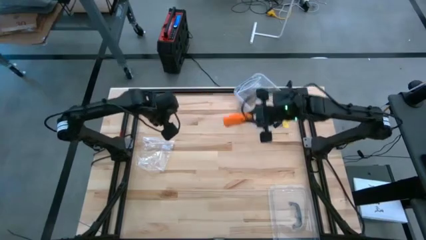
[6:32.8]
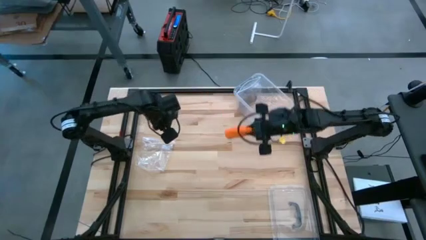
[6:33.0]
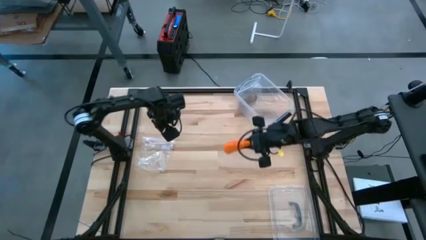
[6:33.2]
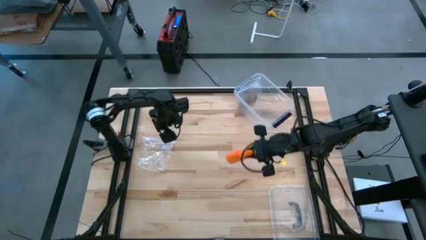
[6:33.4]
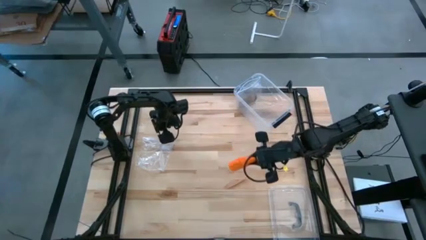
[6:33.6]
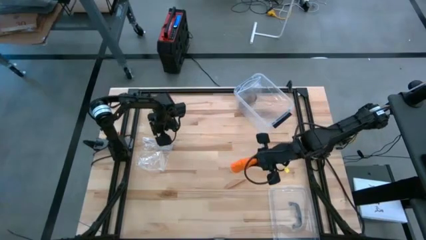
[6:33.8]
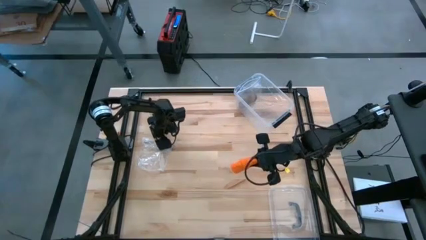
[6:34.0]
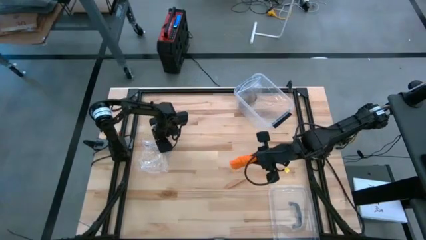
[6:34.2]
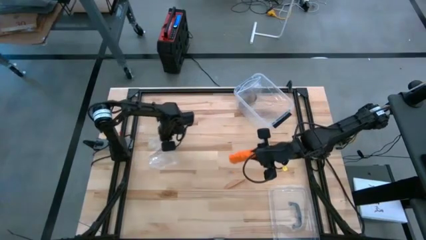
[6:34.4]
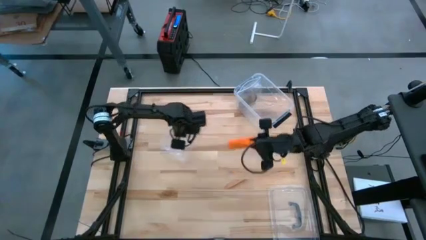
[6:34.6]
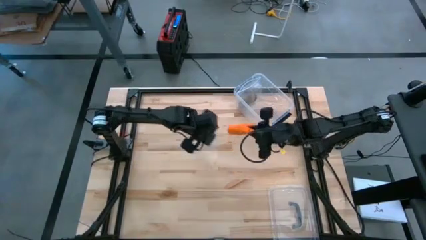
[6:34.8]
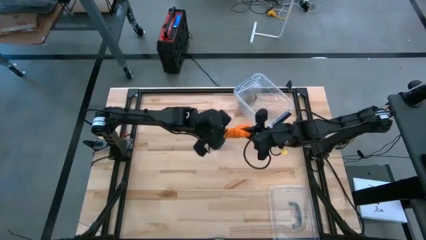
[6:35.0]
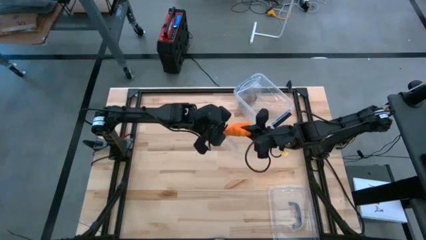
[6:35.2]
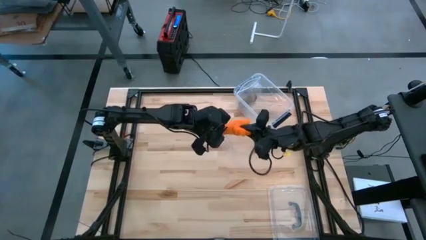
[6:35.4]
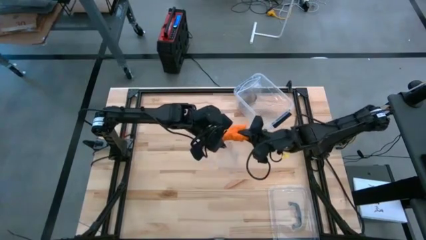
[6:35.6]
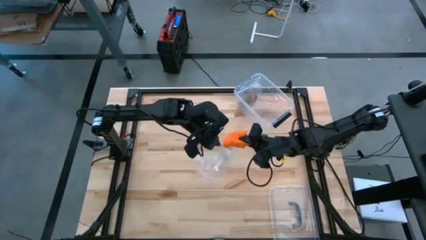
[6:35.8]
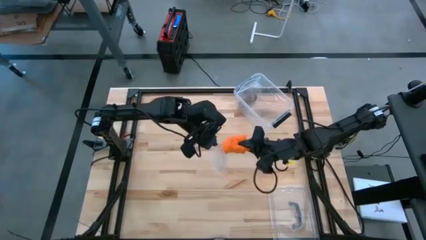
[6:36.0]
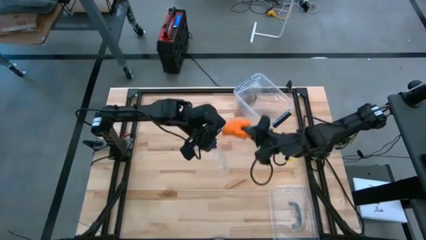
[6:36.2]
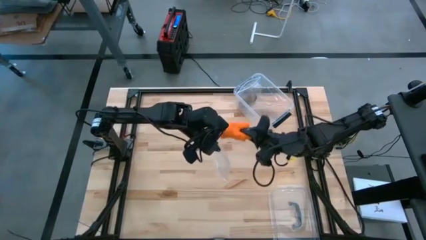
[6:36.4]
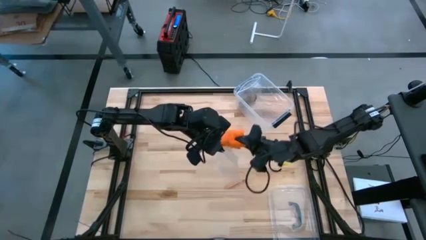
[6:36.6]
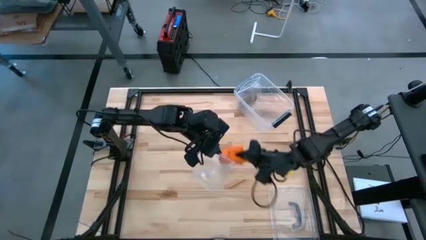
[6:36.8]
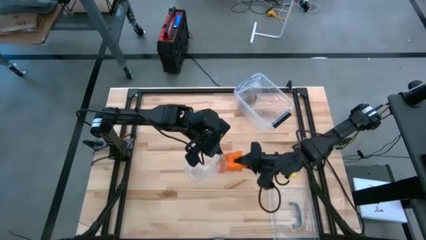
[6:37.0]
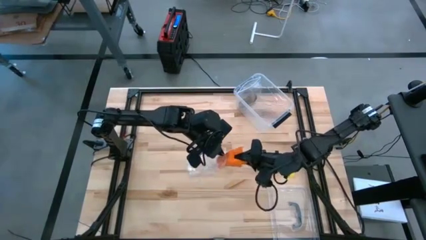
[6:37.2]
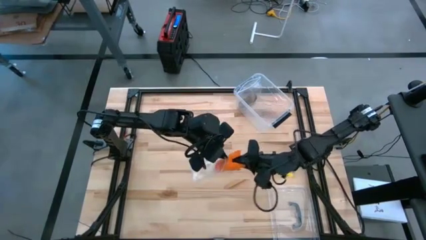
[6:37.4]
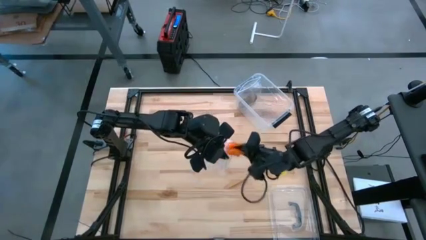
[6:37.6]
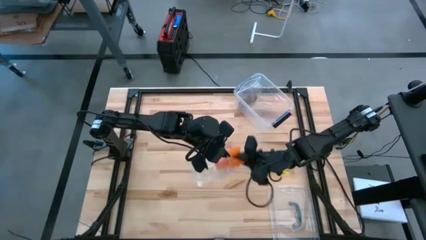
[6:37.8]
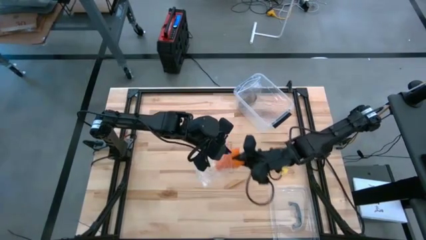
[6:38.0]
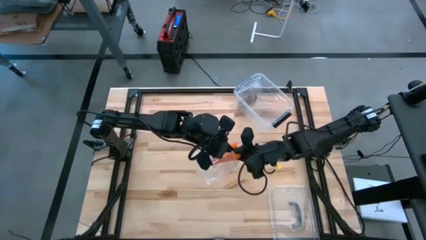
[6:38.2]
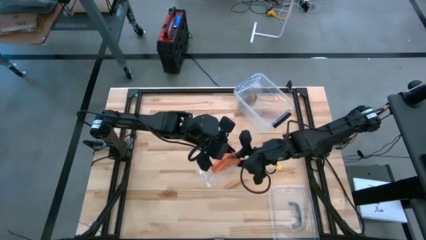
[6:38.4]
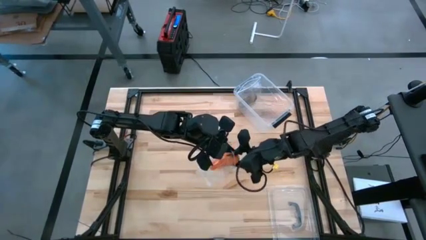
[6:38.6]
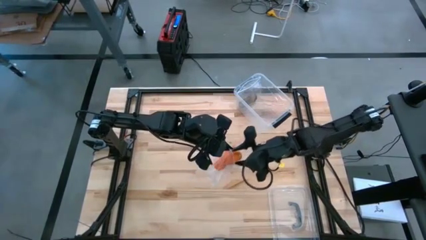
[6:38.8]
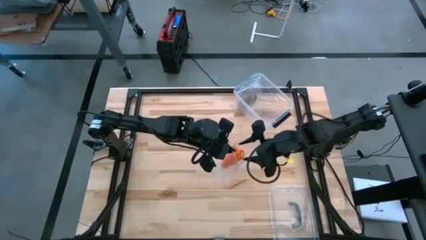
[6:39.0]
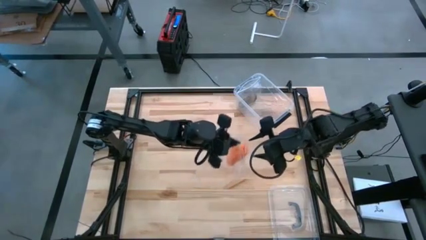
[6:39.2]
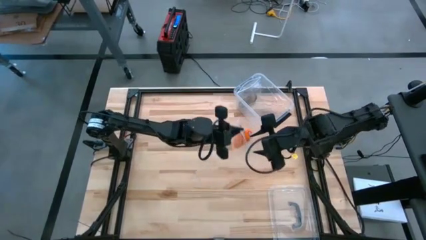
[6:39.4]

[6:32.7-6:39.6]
Task: Roll bandage
Put the orange bandage into the zip bag

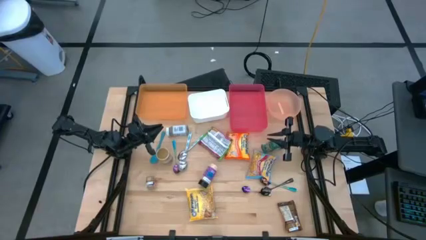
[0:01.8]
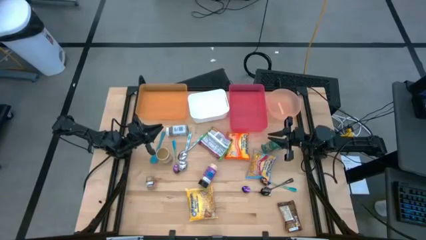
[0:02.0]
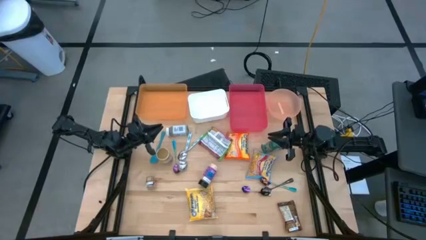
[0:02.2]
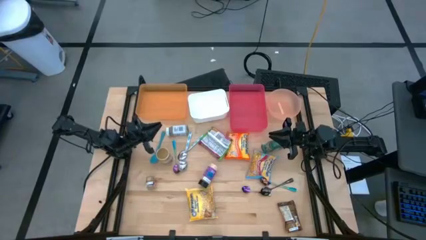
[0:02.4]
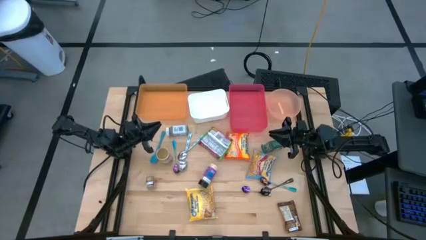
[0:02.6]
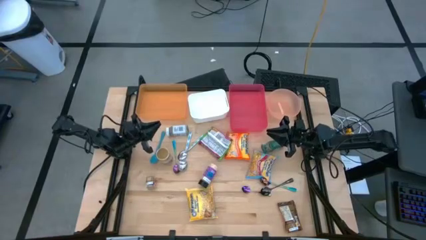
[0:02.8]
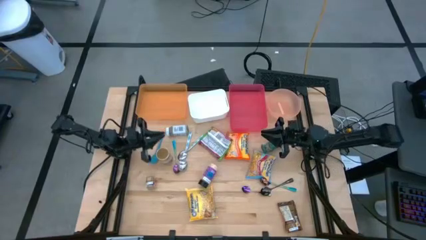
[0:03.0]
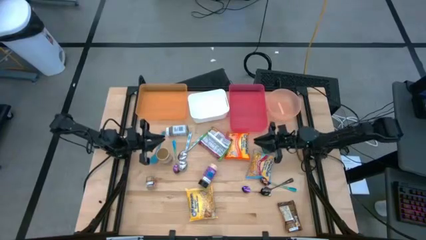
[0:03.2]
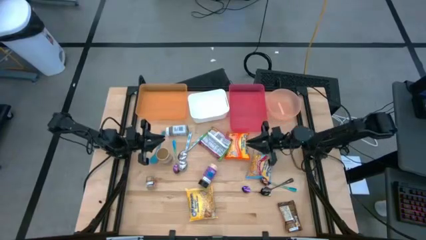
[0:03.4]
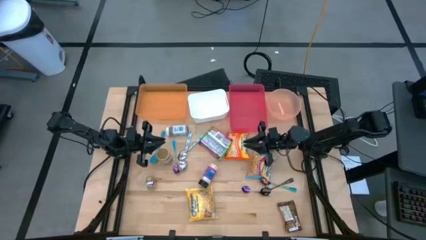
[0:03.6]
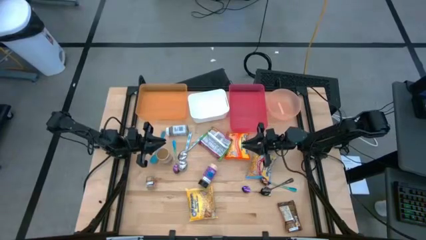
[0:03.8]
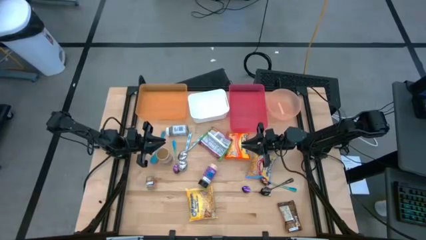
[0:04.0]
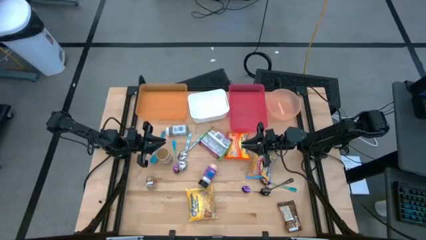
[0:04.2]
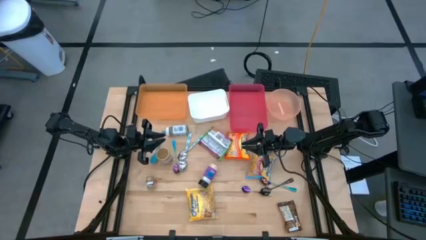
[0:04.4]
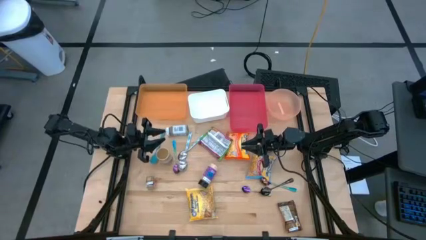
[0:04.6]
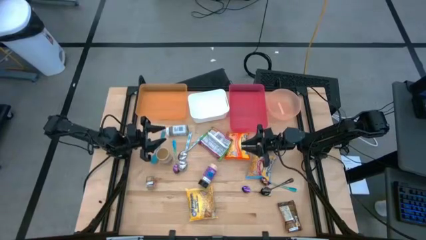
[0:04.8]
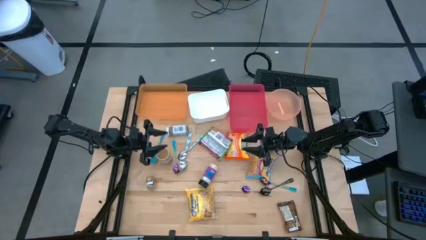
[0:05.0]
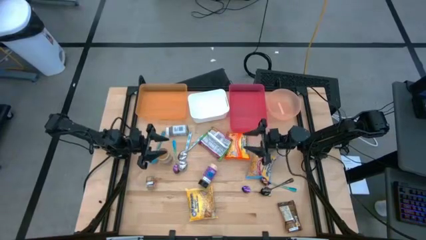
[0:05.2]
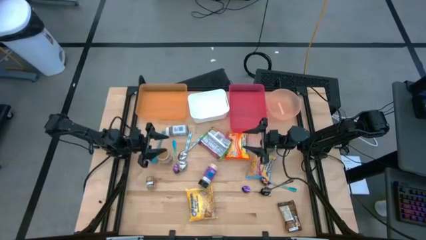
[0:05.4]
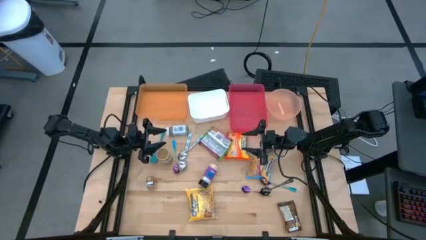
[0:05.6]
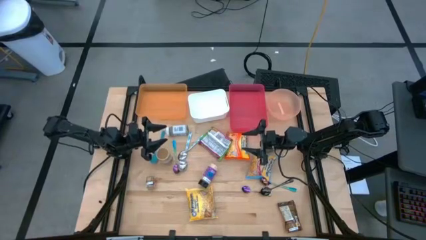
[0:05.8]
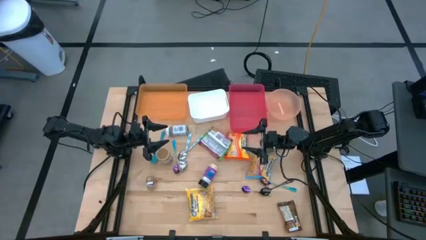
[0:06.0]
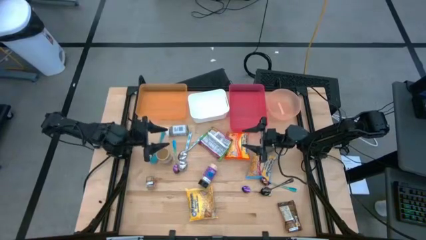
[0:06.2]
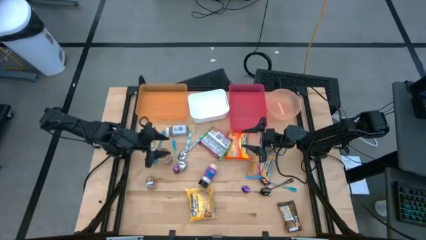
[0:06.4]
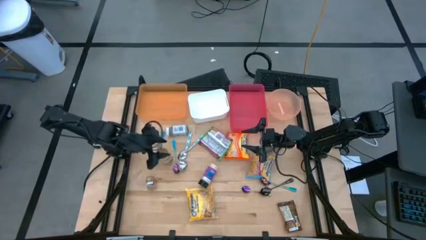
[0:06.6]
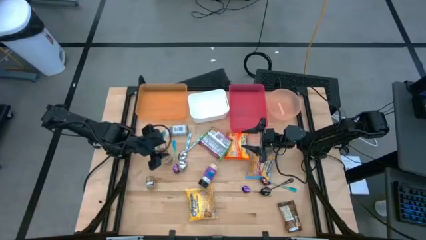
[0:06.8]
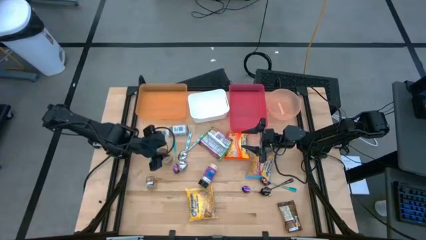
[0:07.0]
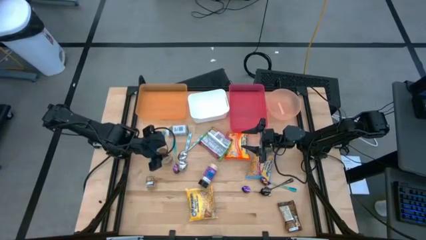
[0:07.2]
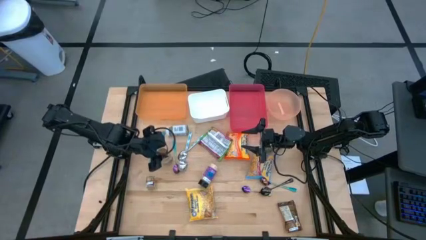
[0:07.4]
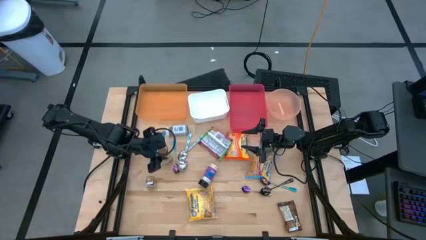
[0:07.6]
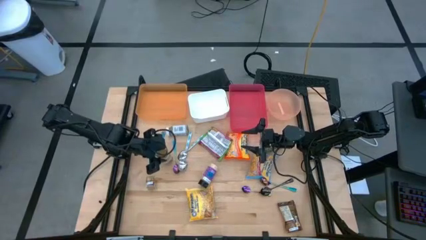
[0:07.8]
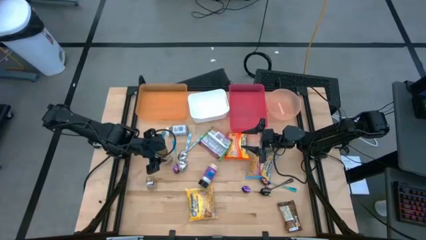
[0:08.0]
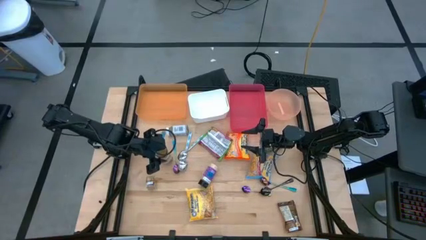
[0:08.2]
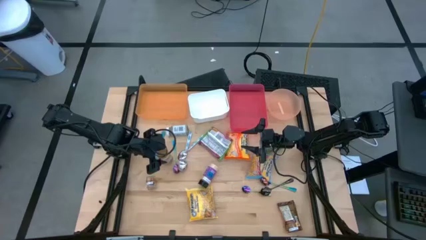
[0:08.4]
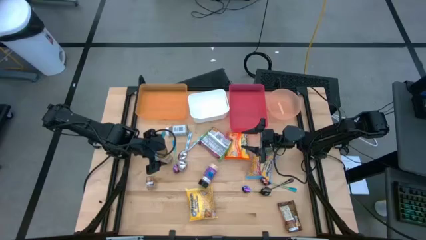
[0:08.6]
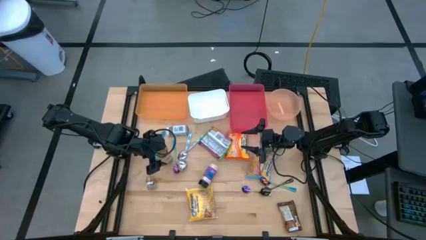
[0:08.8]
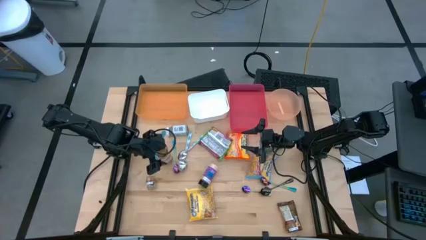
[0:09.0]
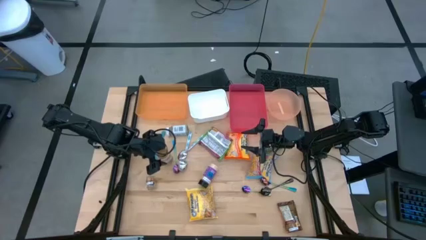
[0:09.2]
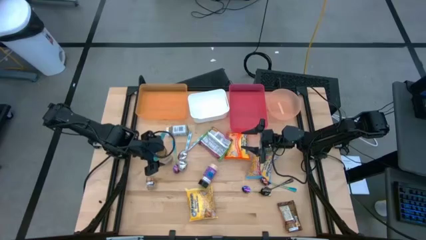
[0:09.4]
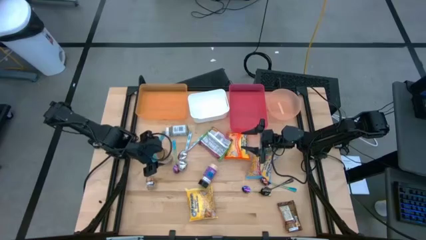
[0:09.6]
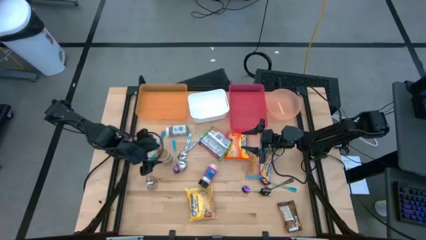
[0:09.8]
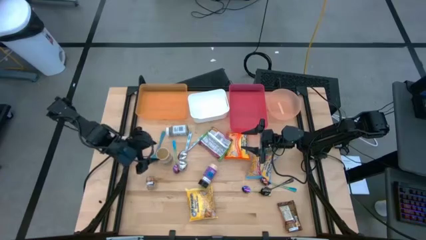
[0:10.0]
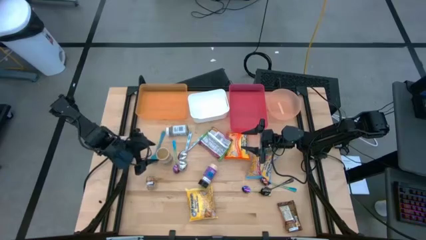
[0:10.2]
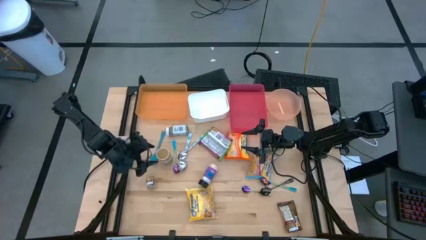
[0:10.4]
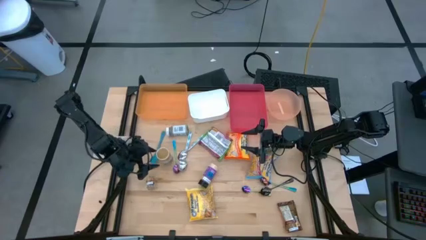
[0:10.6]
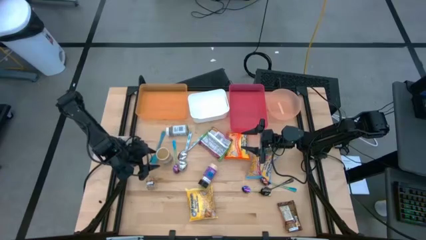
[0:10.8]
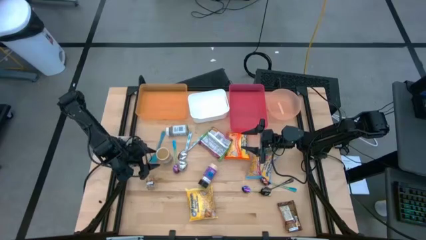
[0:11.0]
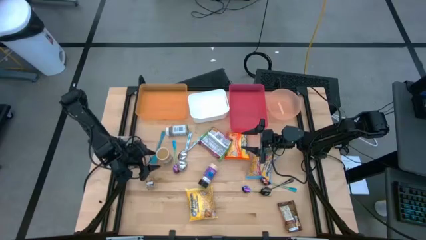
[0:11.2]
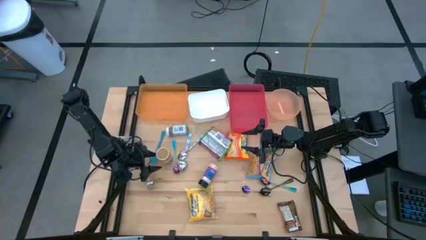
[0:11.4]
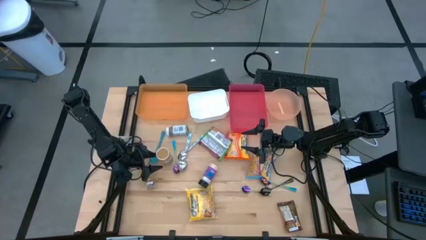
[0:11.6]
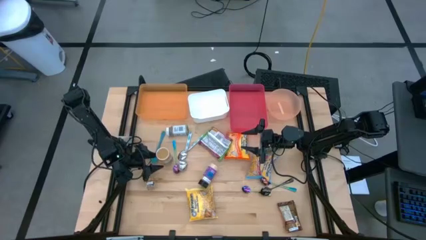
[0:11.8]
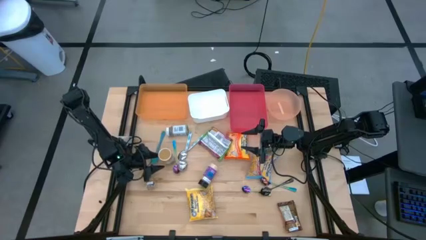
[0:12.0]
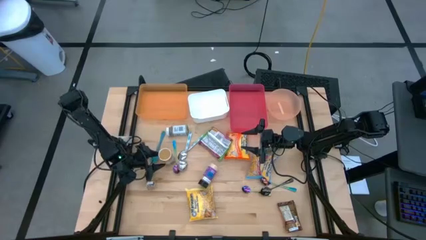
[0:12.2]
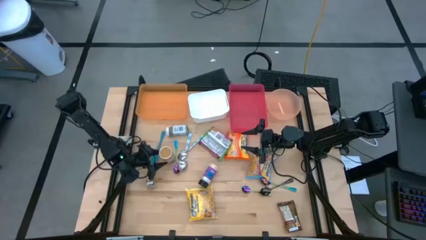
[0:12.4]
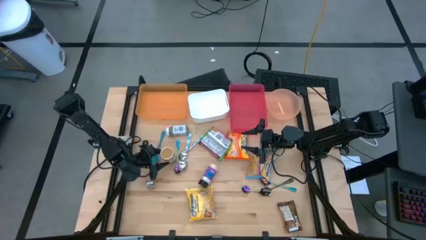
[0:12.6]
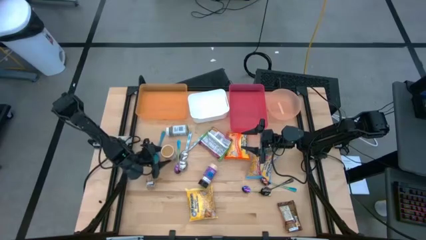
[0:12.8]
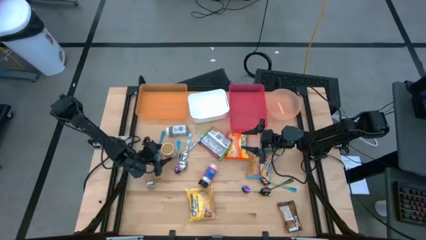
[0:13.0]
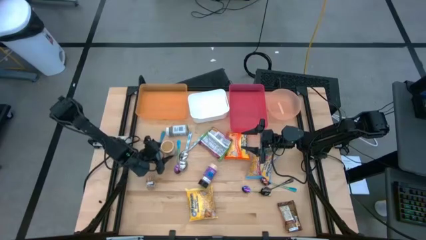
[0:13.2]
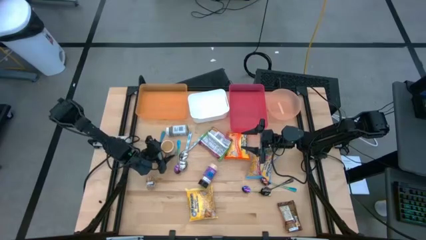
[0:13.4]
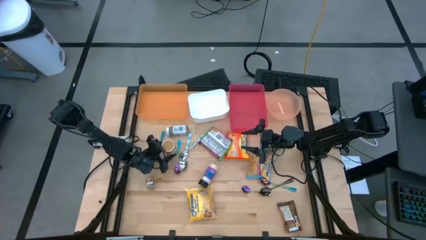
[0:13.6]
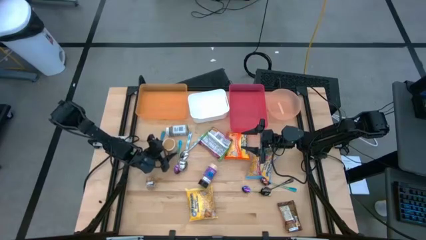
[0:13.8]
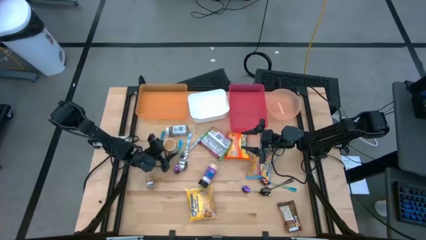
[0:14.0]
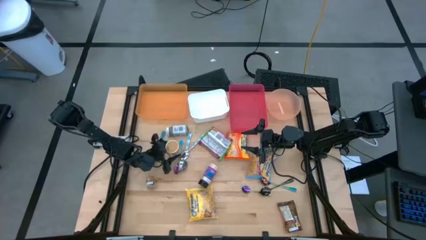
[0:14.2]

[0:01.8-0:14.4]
Task: Pick & Place Food Item
Put the gold seasoning bottle into the pink bin
